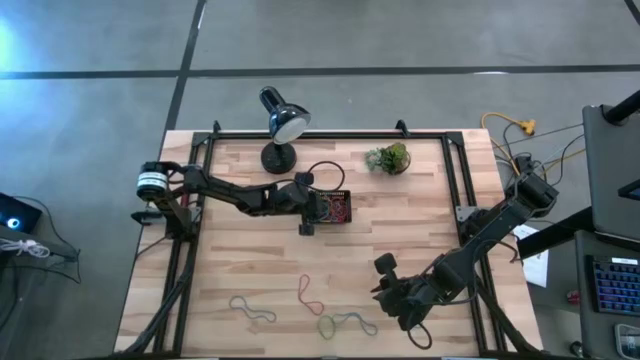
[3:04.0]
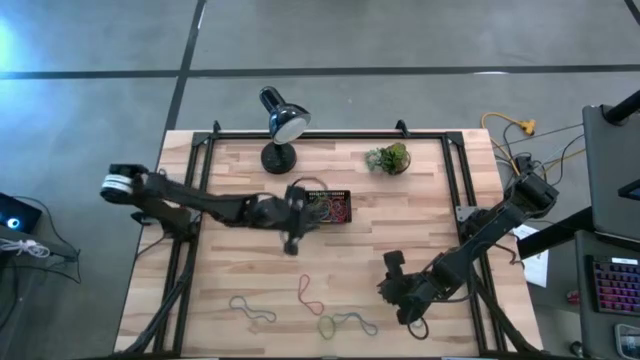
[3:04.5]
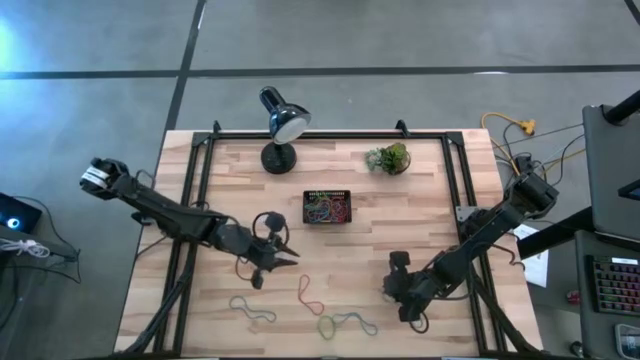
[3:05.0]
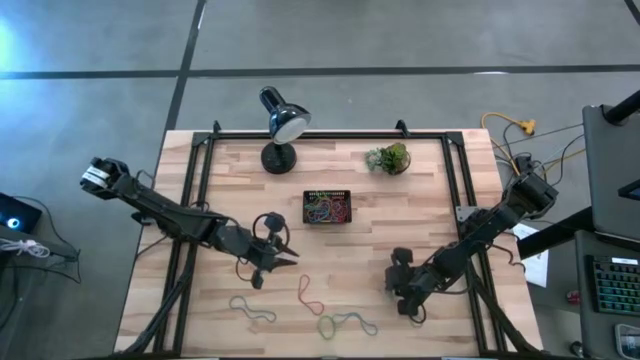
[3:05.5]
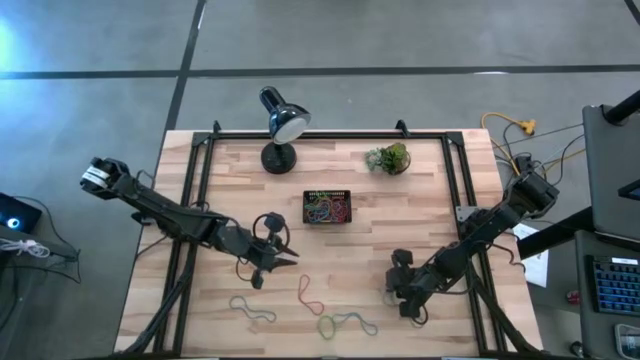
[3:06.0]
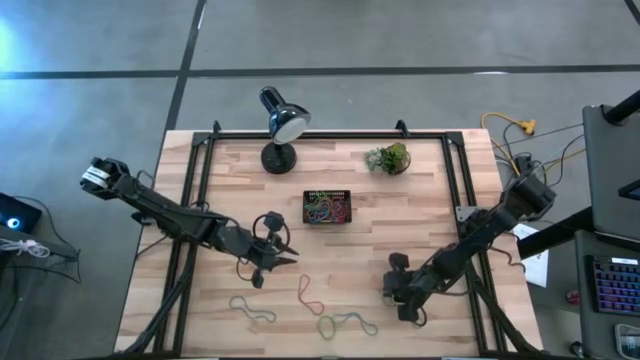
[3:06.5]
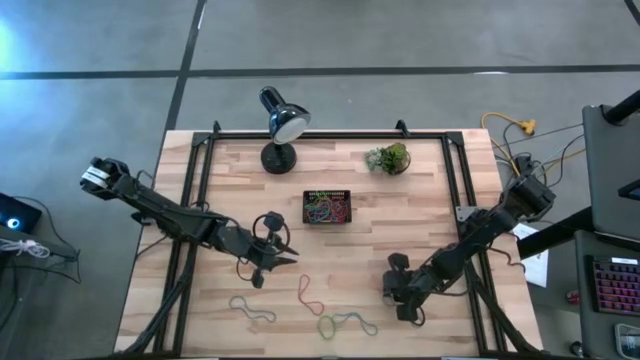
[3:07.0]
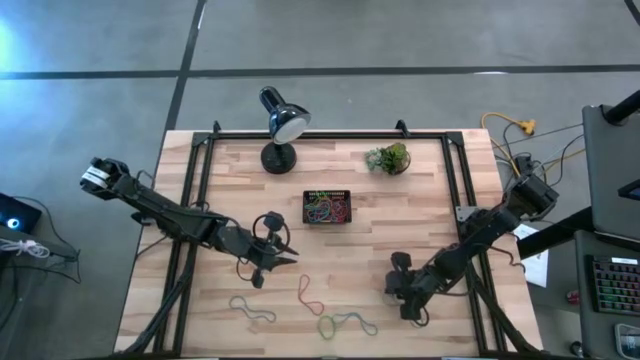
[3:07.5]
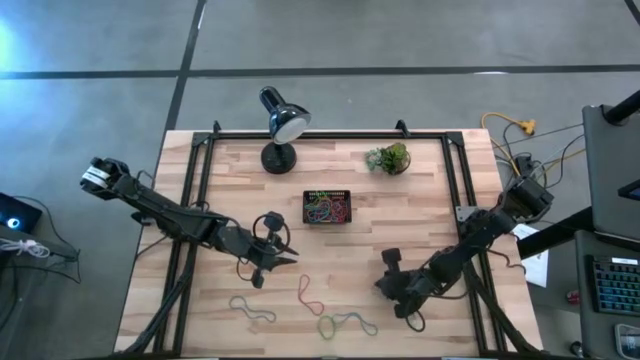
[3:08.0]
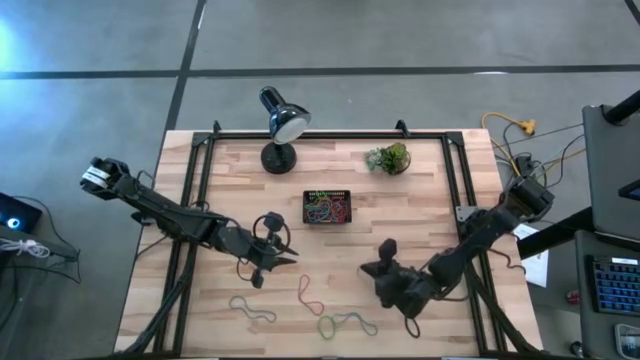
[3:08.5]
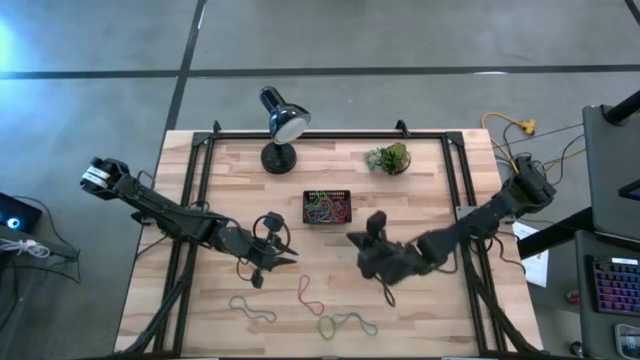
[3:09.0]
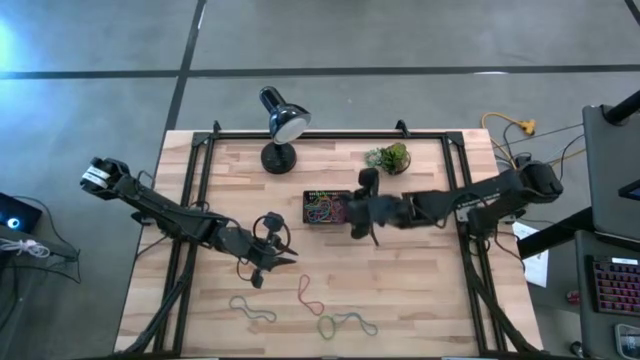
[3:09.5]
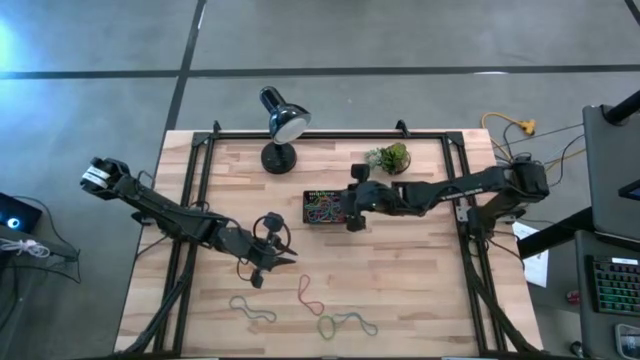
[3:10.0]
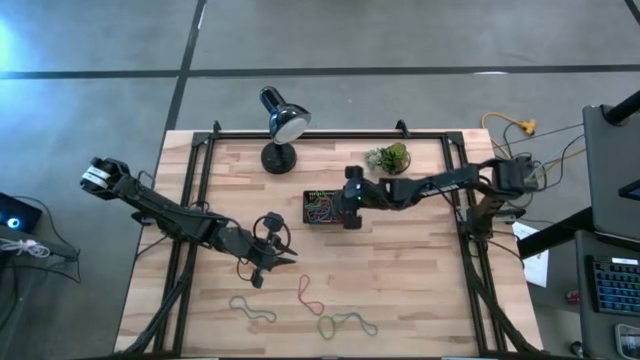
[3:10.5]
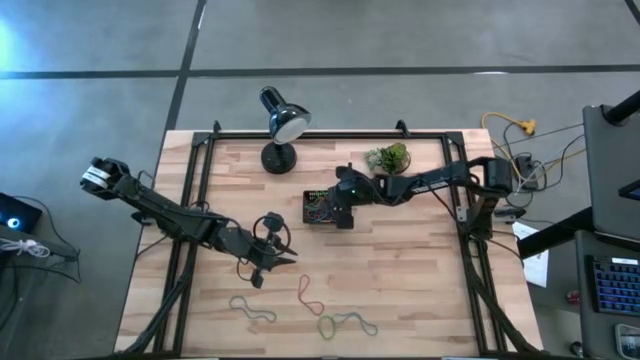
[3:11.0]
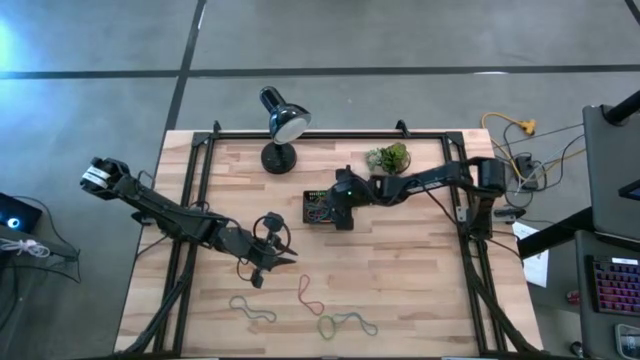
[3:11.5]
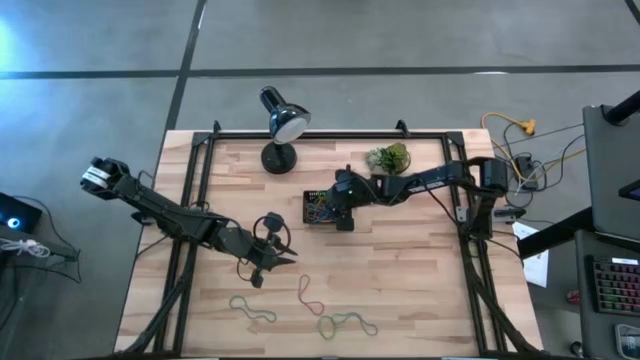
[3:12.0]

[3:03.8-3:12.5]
Task: Pick and place rubber bands into bin
Put the blue rubber band into the black bin

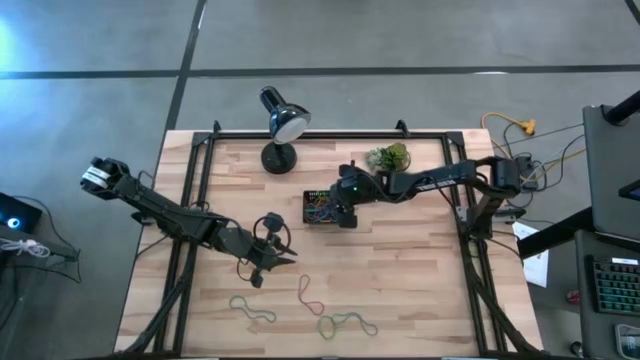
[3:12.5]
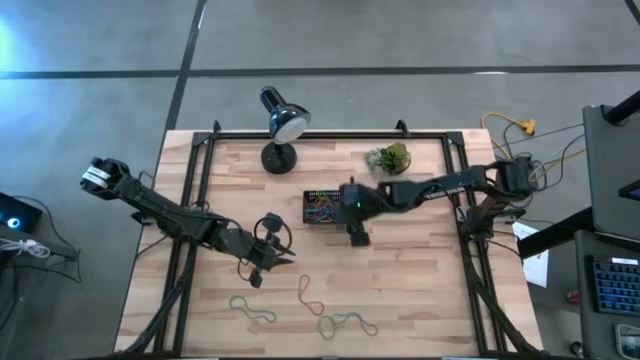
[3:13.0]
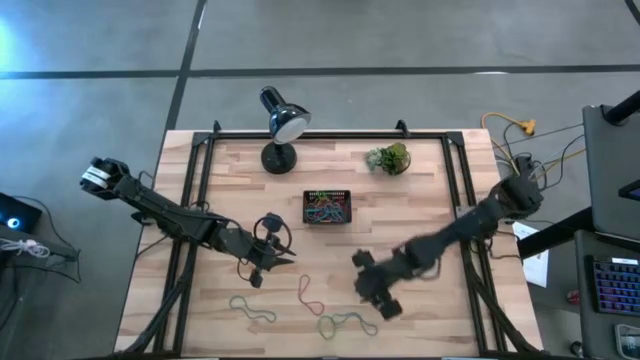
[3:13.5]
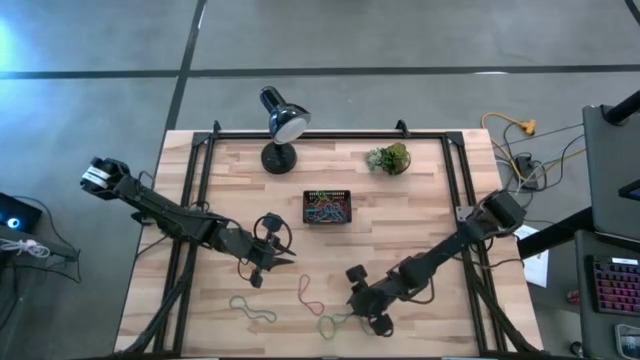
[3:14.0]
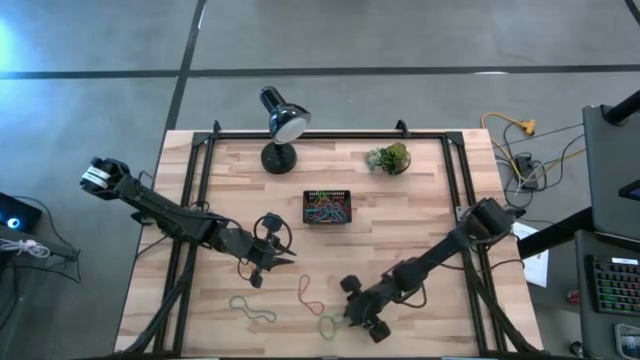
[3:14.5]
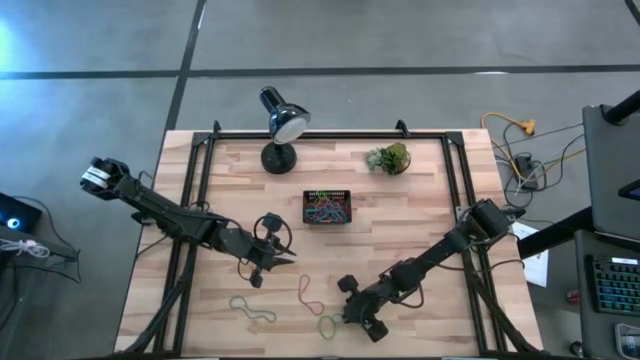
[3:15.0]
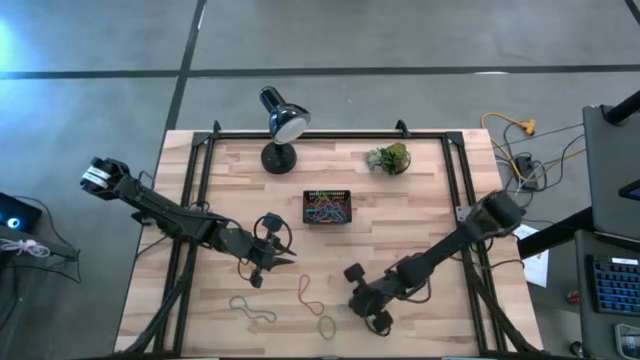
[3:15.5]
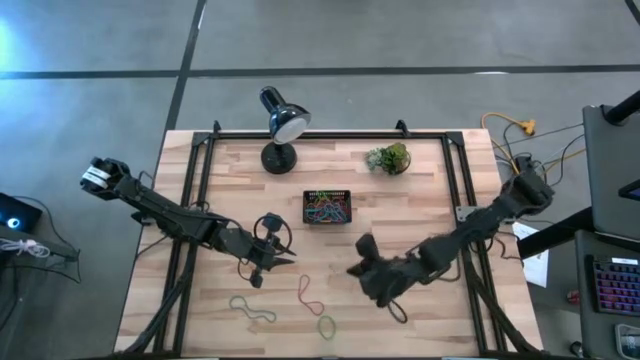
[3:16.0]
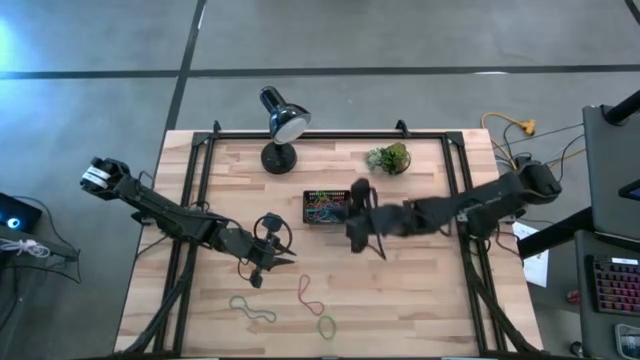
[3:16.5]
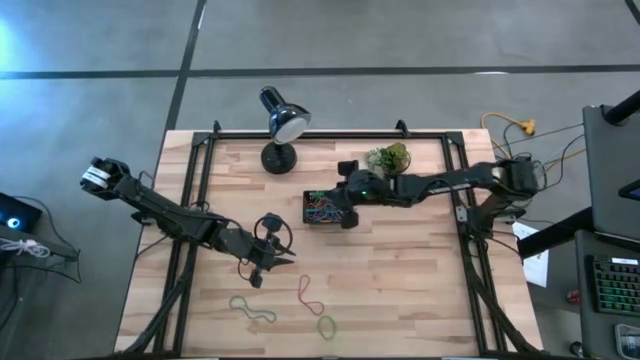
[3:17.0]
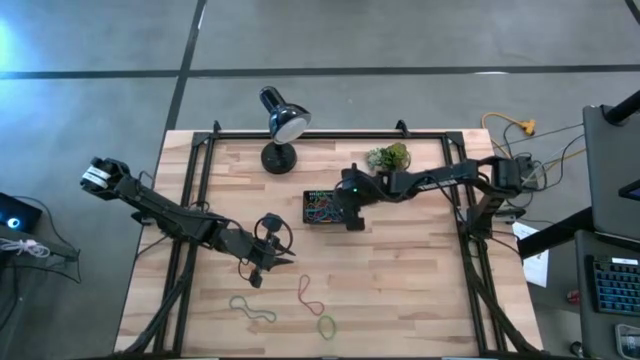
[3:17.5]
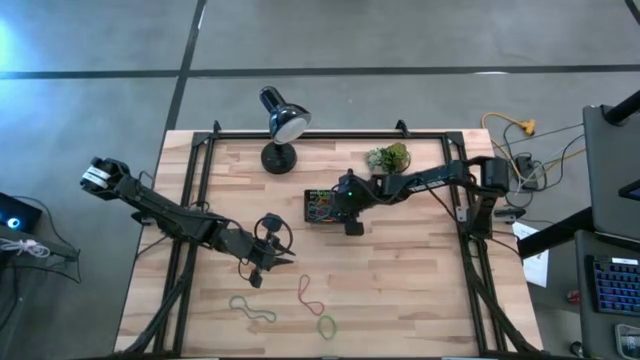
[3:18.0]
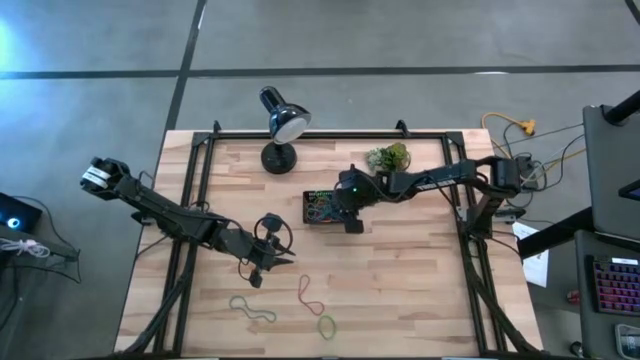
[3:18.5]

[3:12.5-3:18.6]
Put the blue rubber band into the black bin

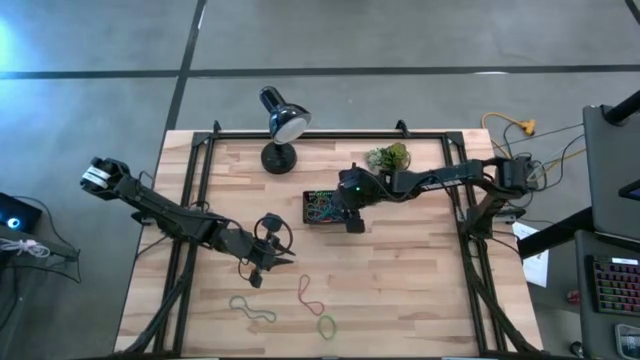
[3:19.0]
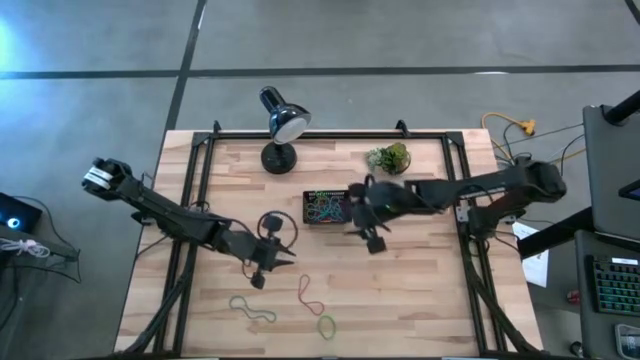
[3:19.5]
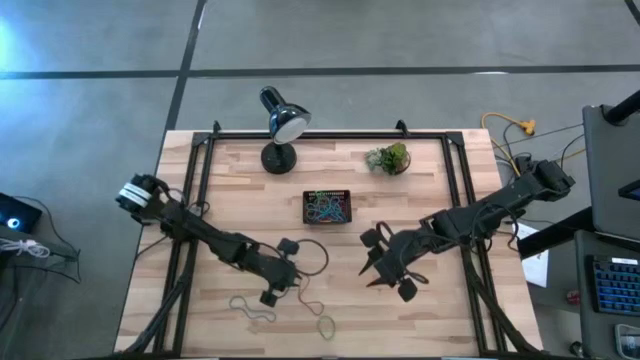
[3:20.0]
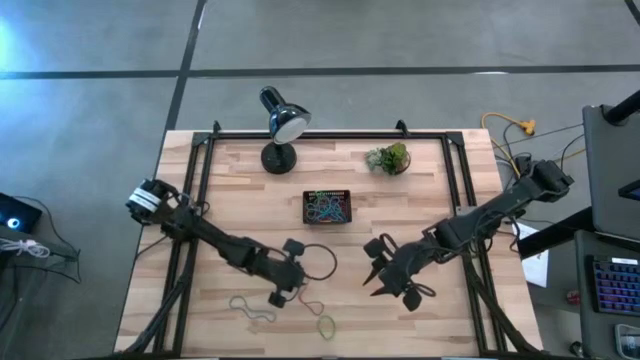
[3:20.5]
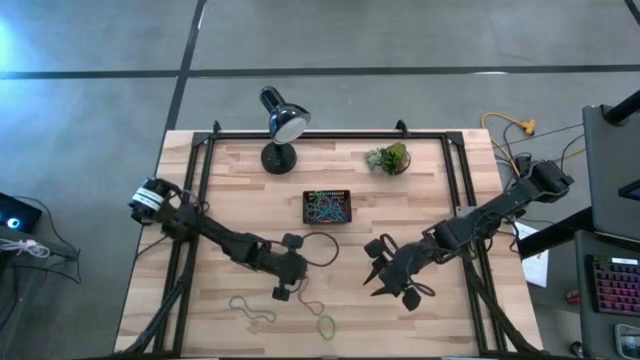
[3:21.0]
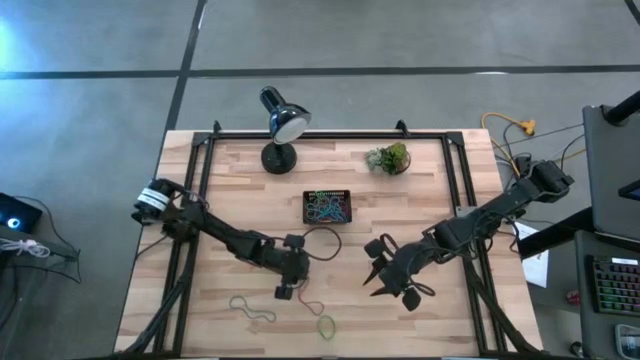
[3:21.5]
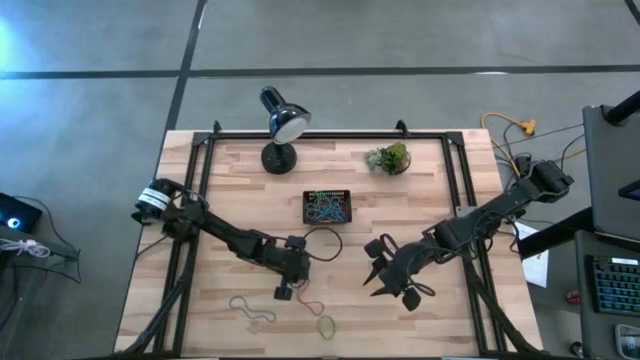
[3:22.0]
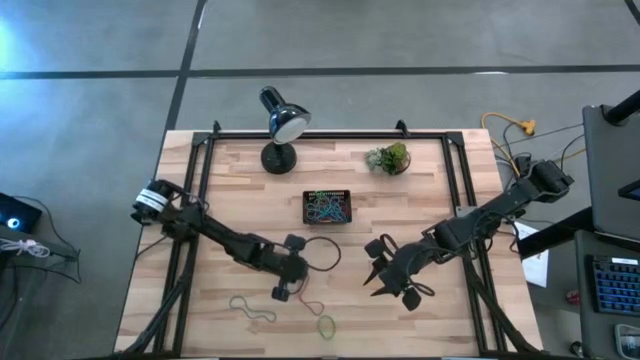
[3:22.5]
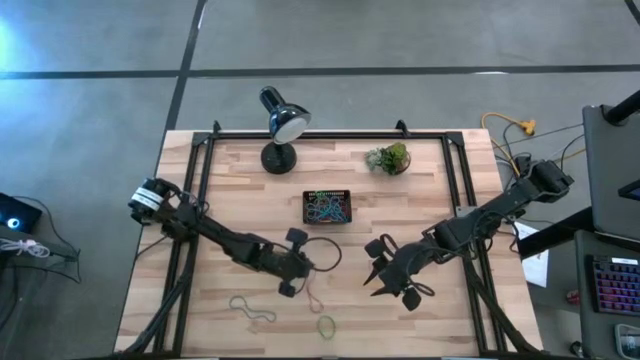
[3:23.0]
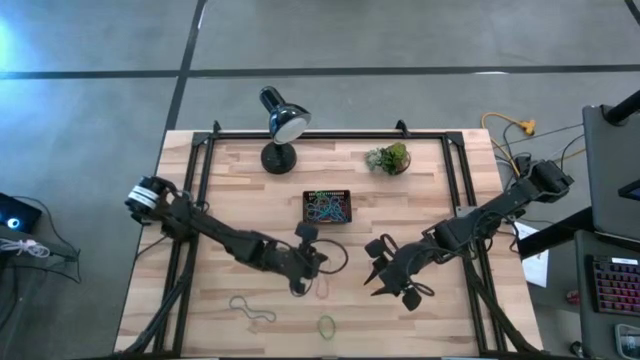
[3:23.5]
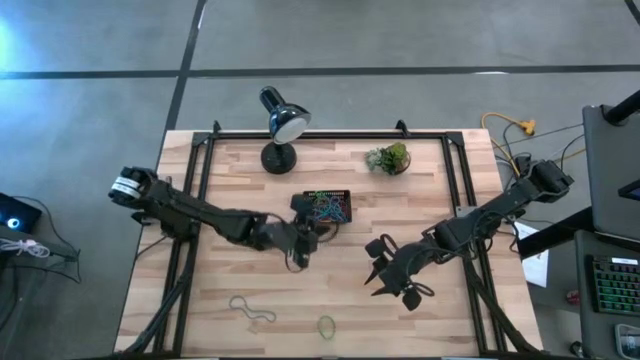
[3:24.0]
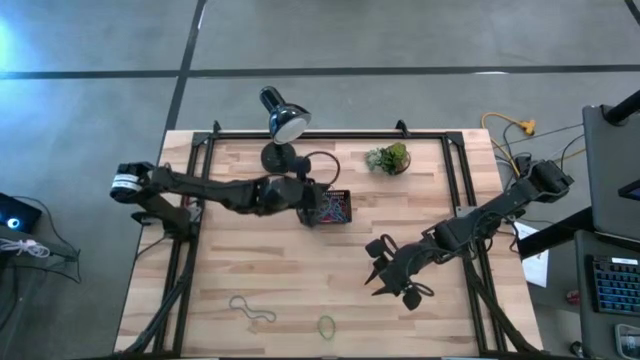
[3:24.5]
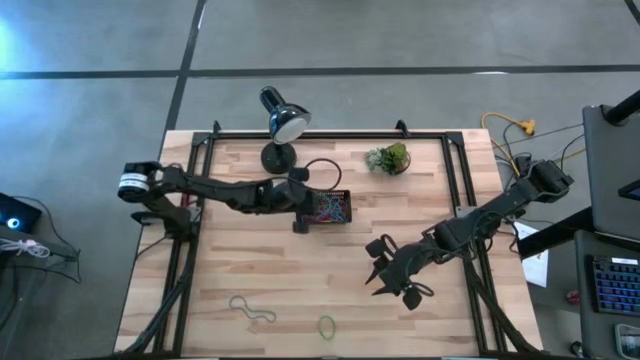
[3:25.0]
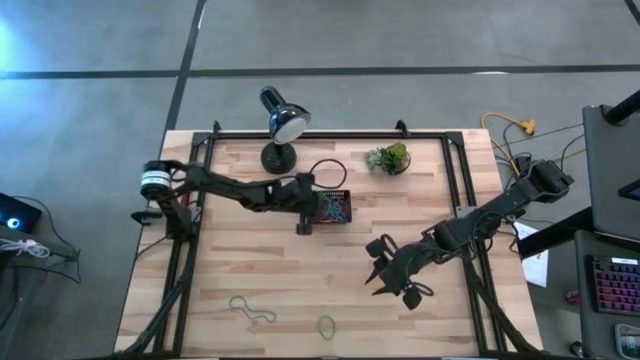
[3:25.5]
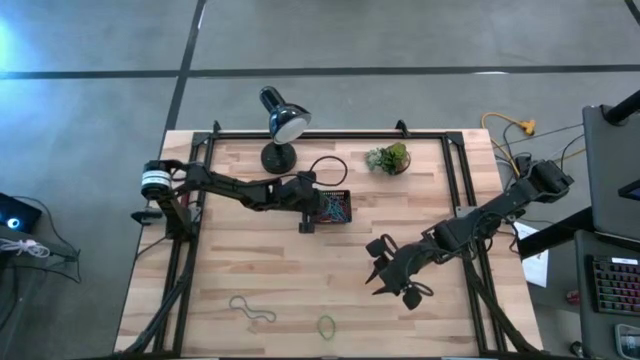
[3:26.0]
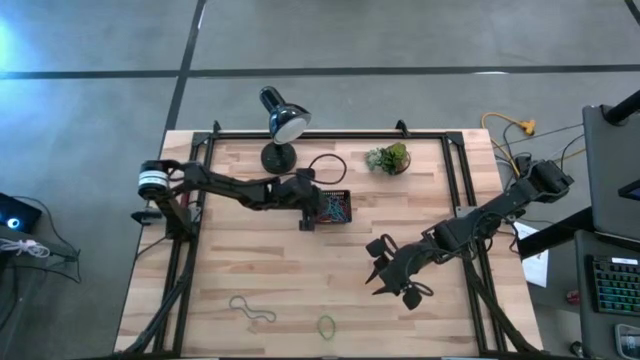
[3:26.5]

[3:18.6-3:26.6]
Put the red rubber band into the black bin
